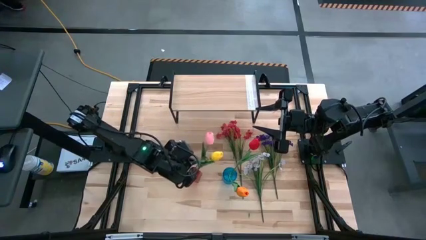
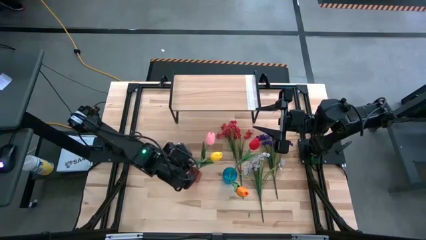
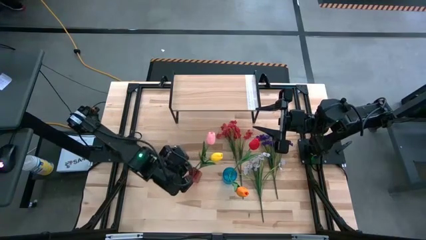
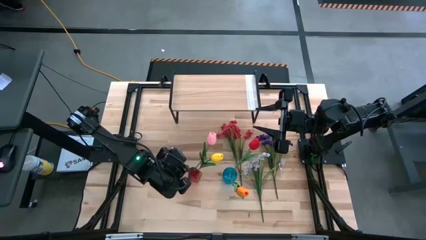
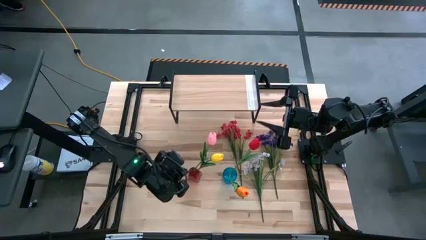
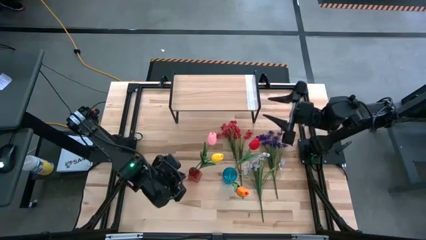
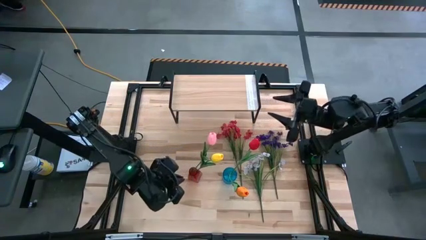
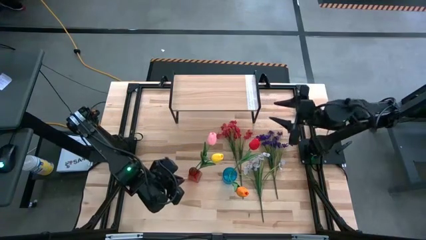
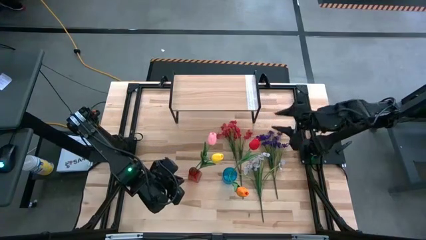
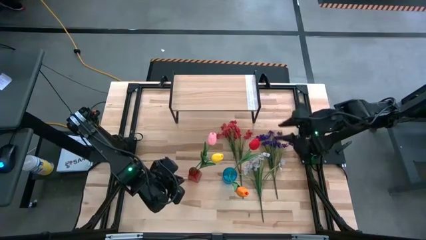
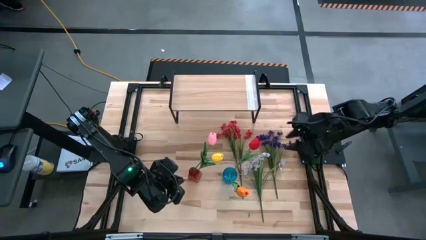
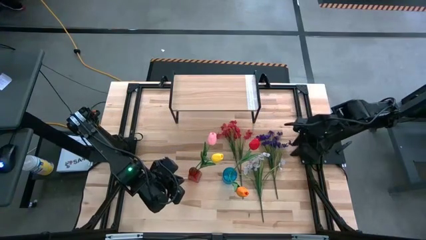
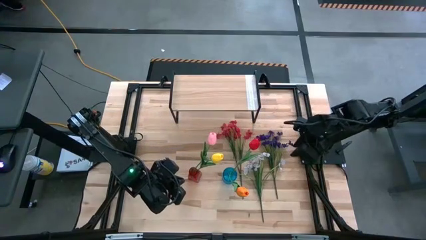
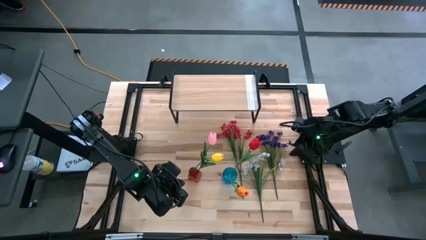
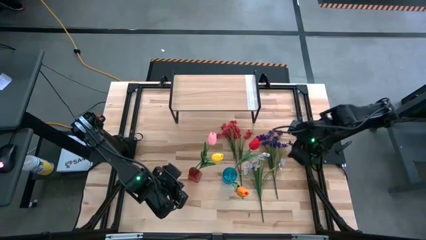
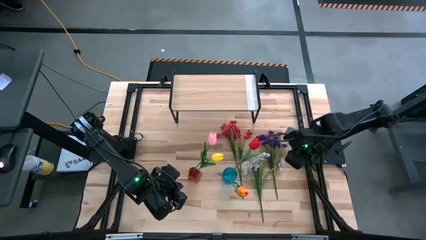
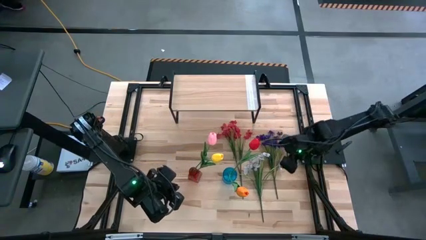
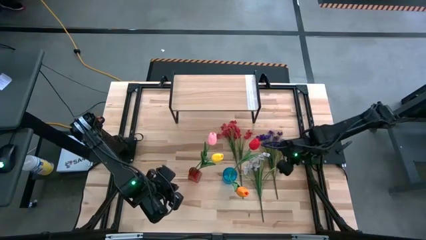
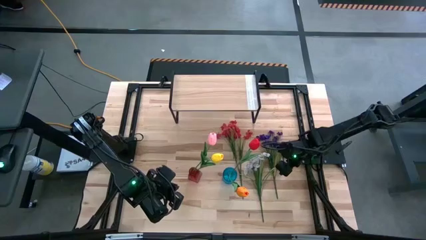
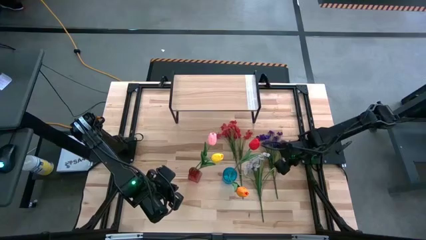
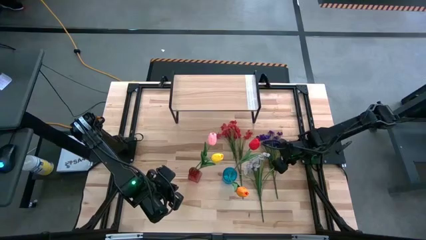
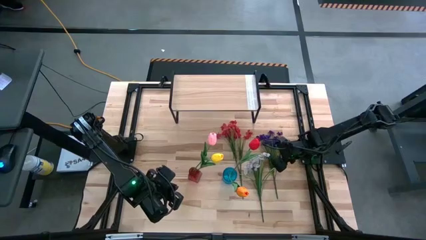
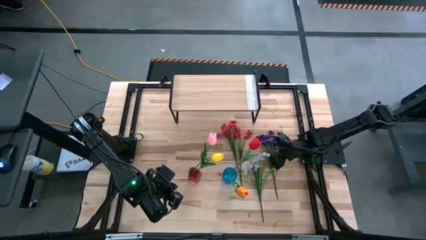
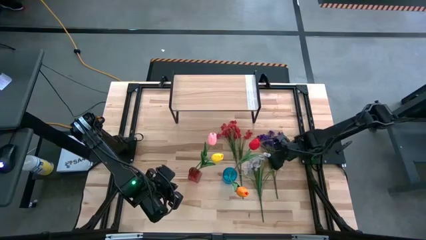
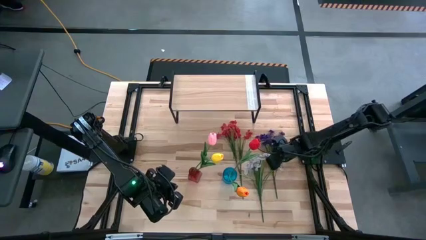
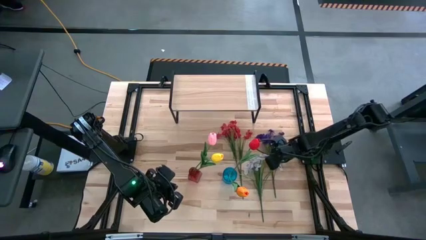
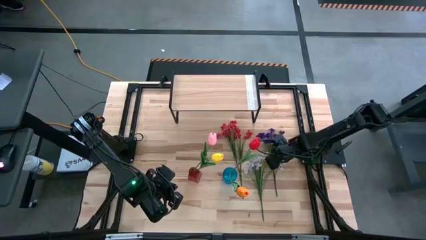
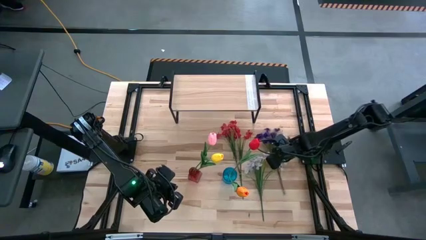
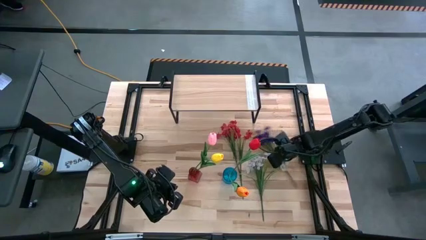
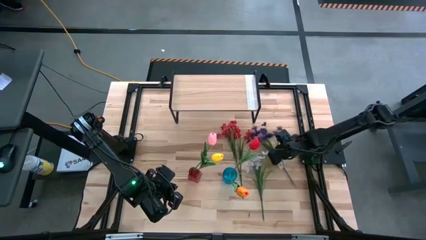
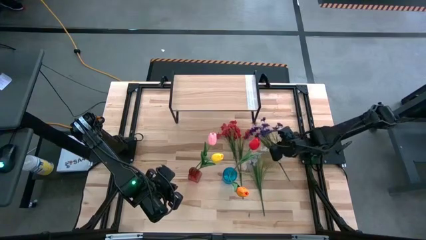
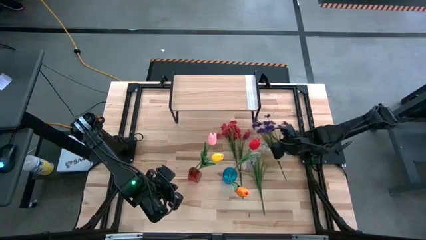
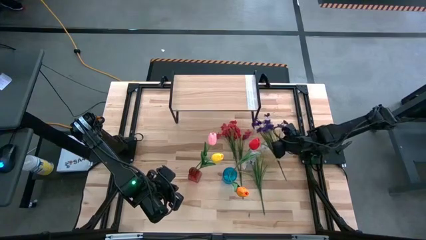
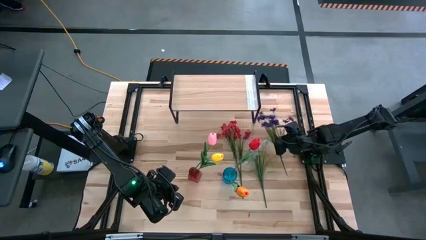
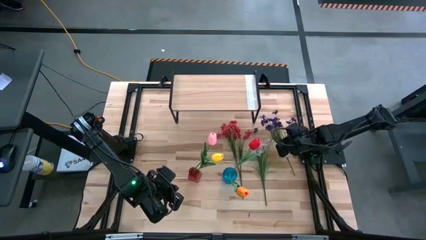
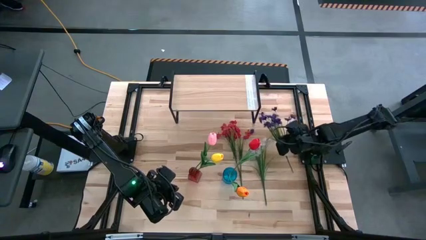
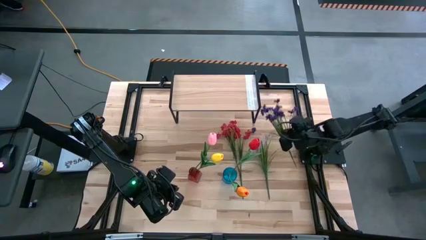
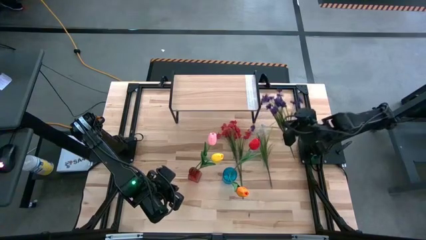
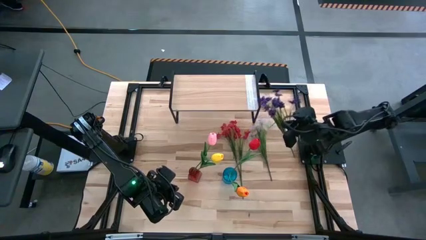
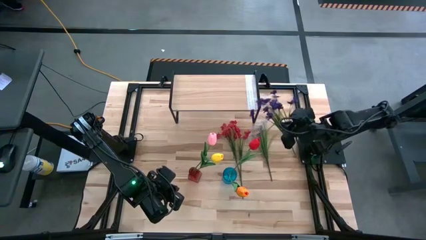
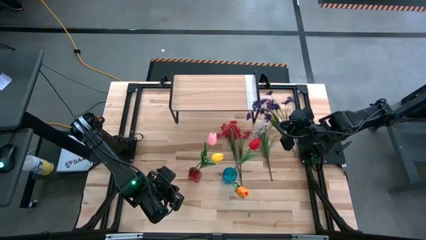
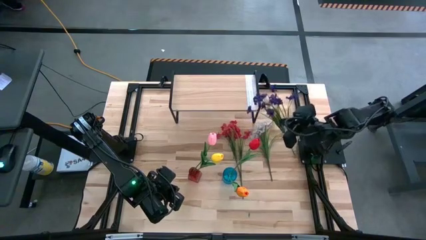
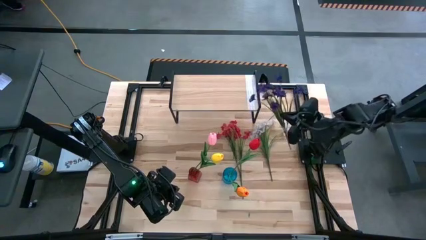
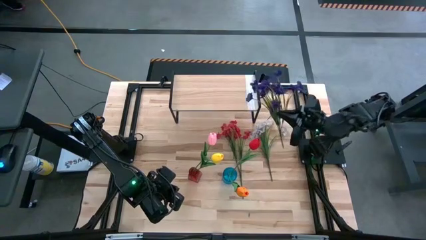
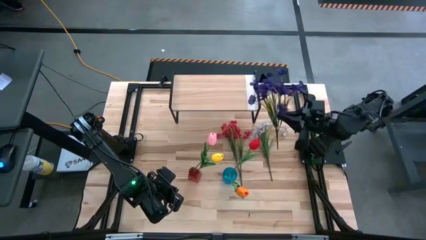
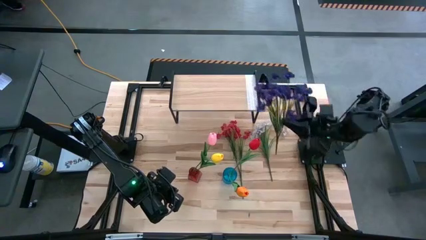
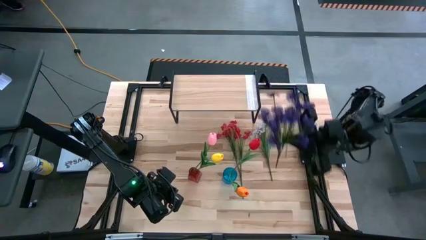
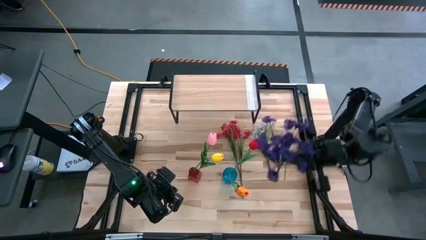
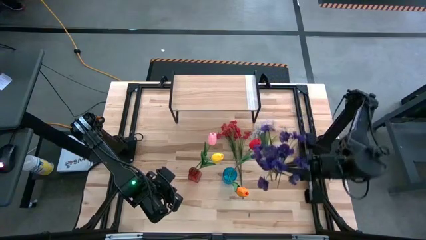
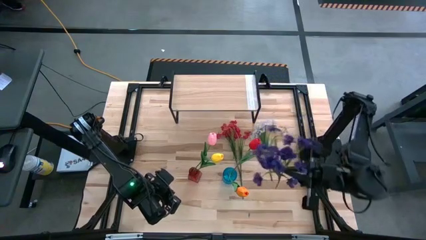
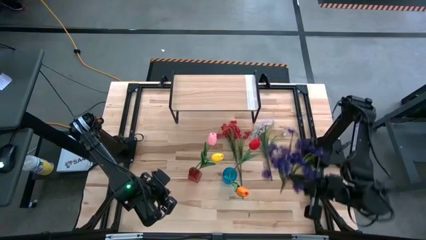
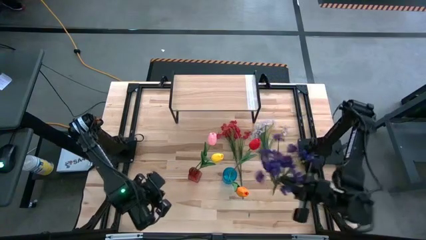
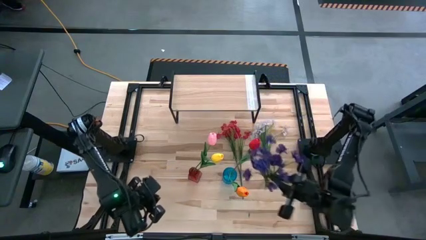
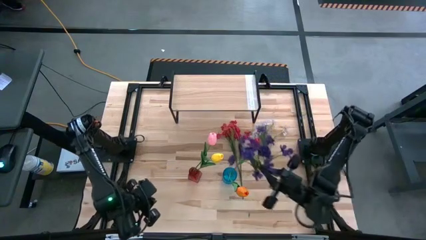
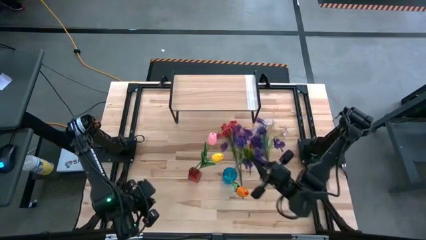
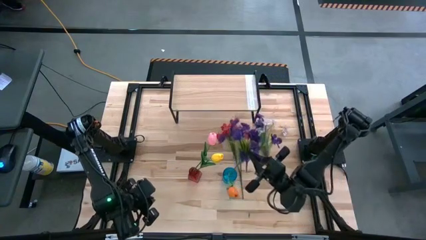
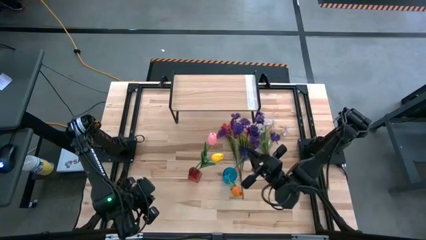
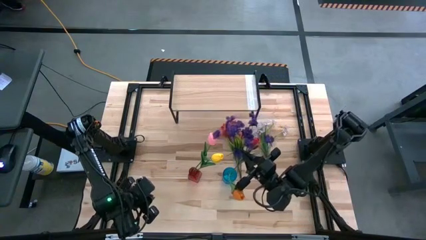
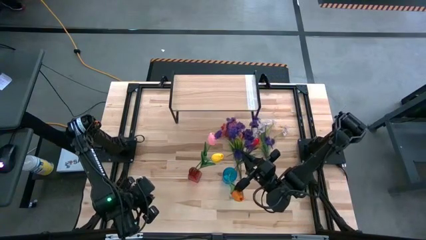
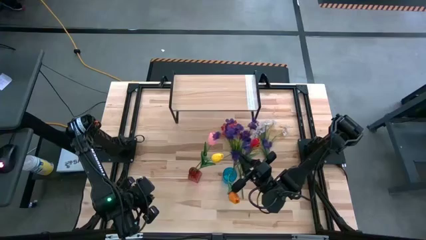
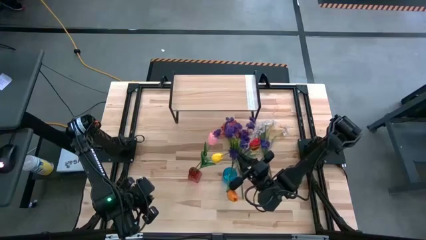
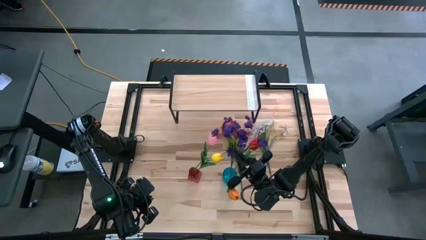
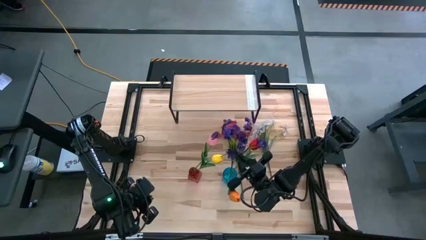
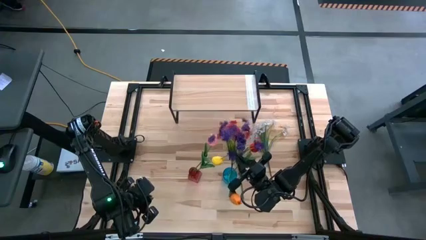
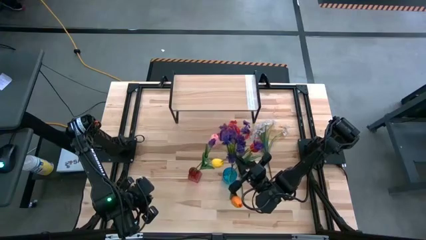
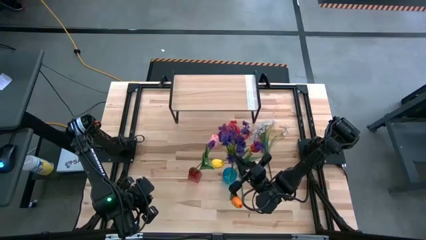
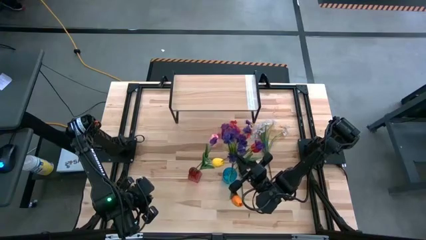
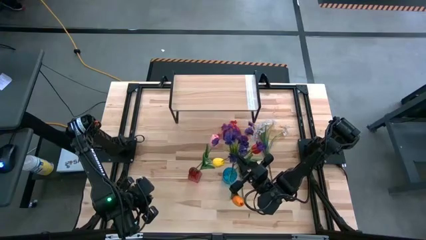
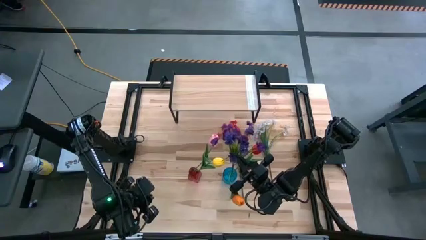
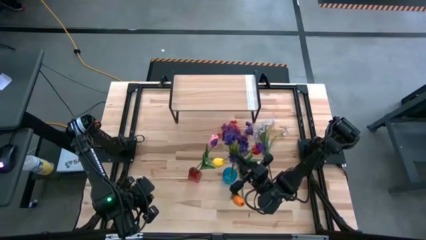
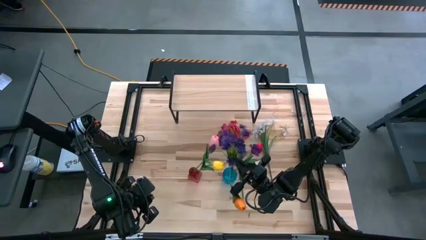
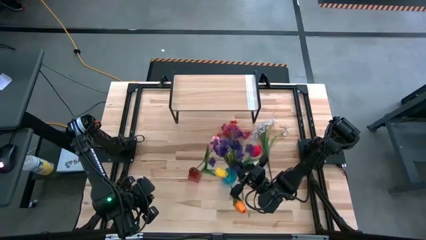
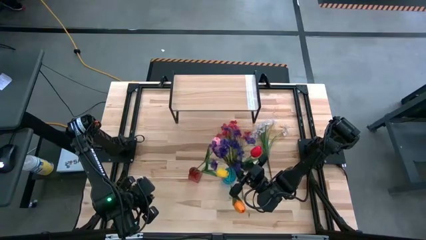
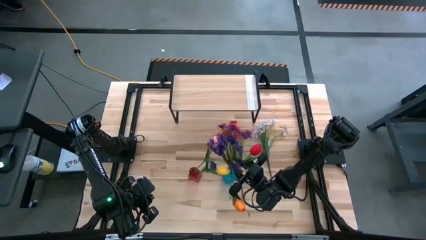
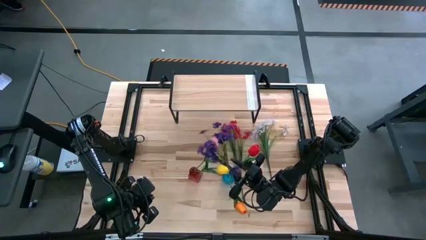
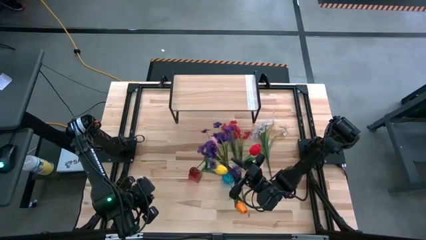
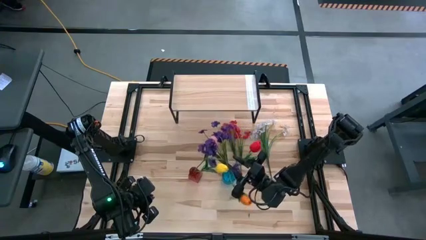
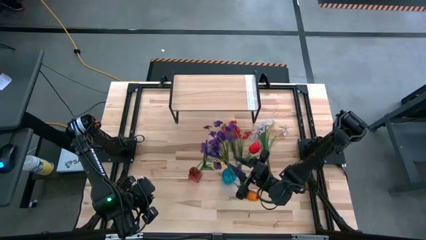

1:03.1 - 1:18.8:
Task: Pick and place flowers into a vace then onto a shelf
Put the violet flowers into the blue vase
